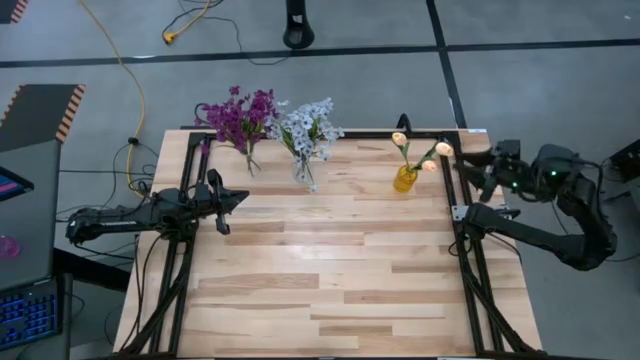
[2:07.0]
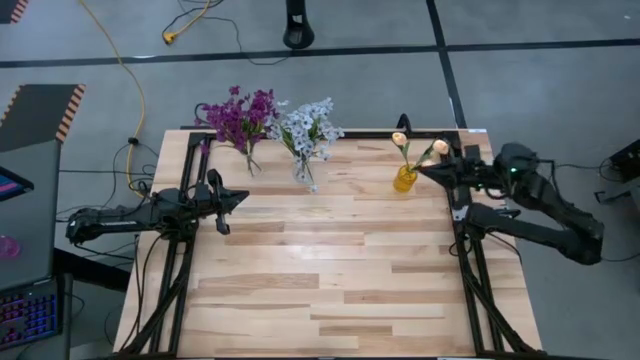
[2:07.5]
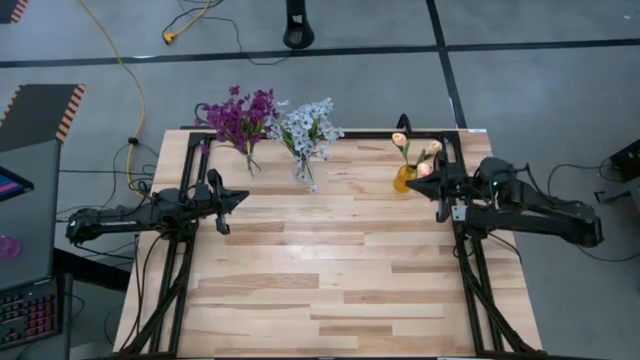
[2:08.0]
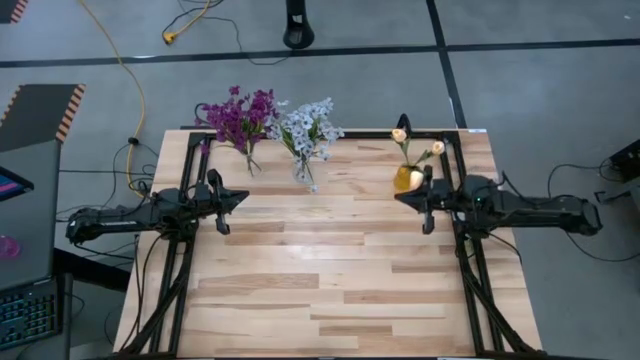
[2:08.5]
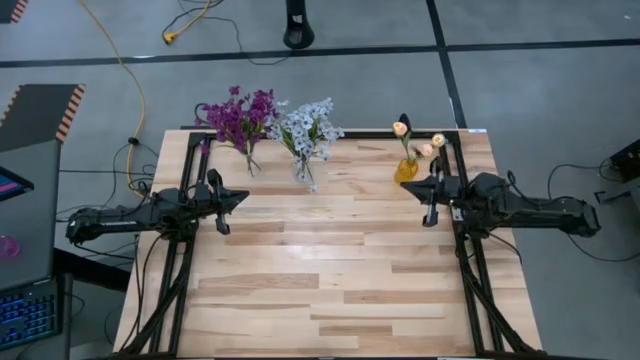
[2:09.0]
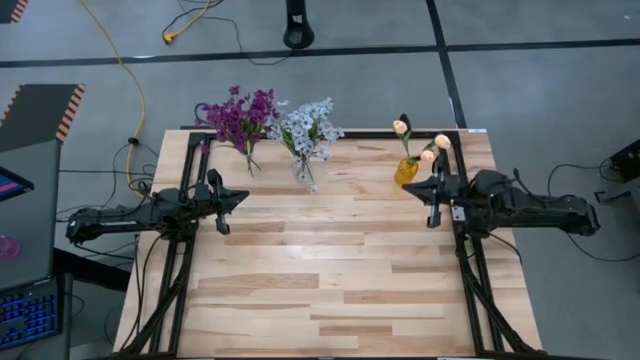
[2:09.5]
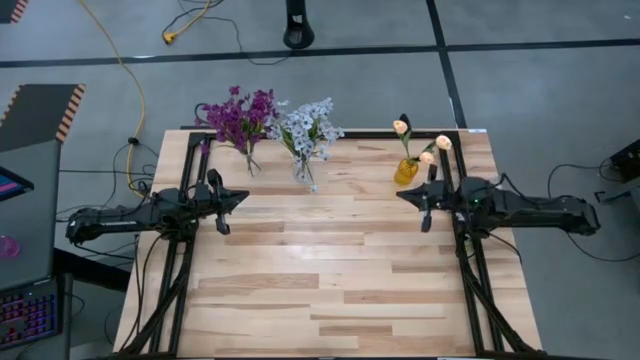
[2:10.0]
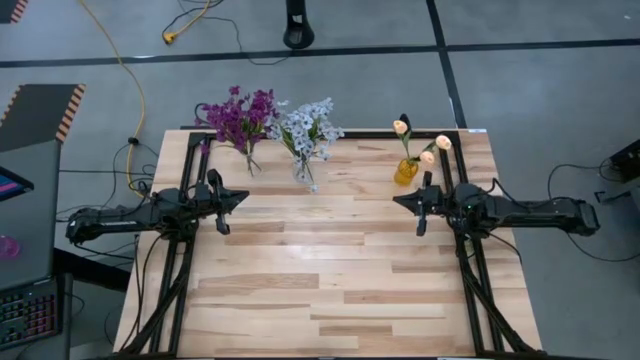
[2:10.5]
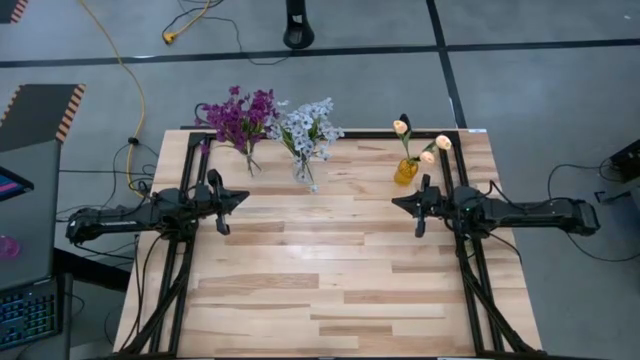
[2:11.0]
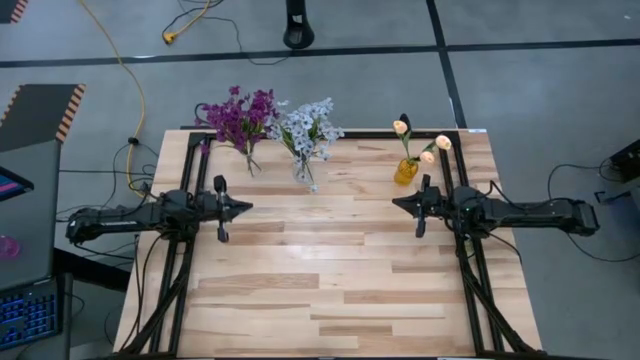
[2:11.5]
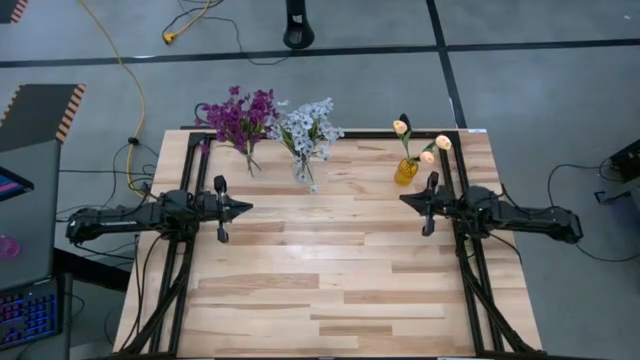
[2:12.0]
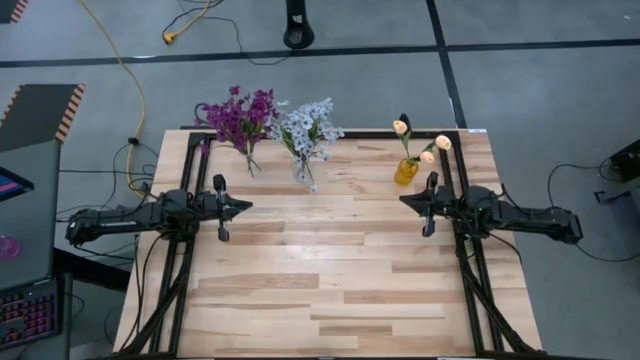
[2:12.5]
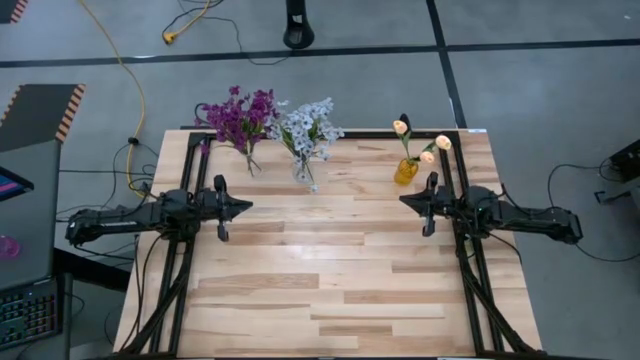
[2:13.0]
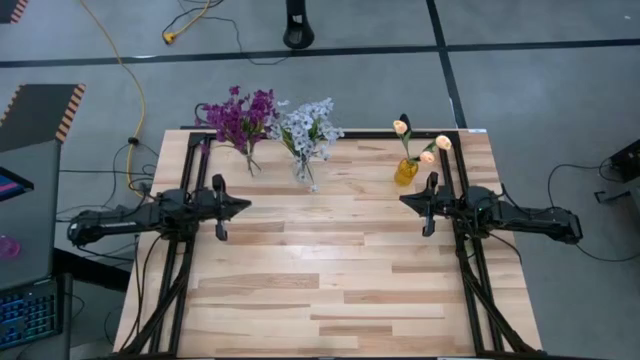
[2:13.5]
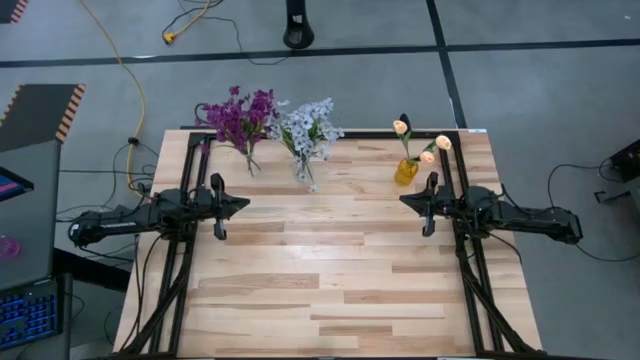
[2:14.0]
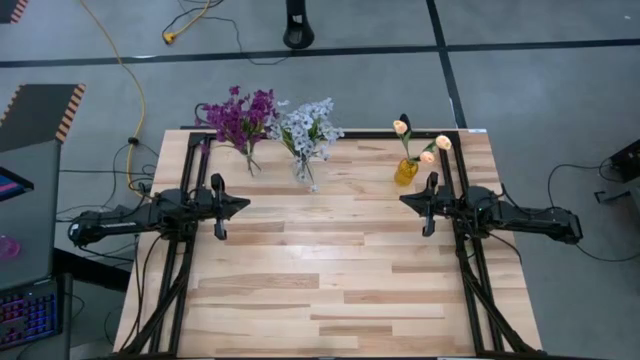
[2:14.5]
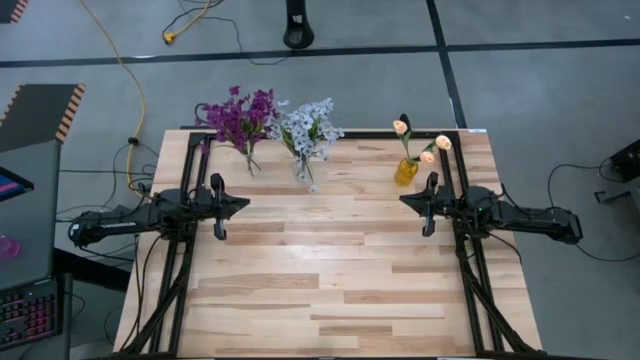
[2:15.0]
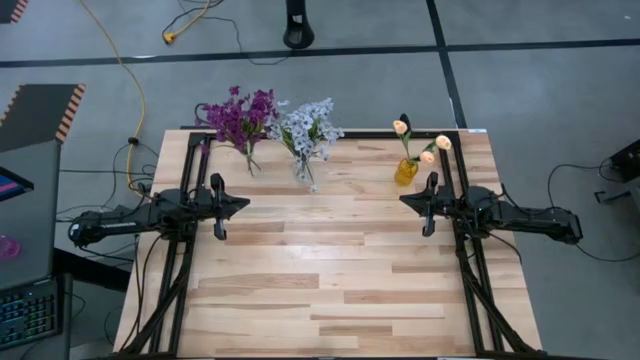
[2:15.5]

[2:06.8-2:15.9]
Task: Sort flowers into vase by color
Return to Home Position

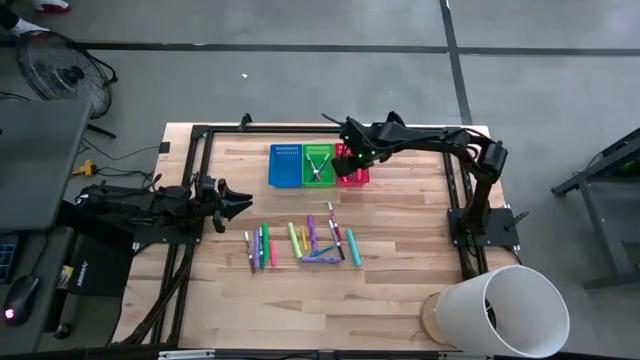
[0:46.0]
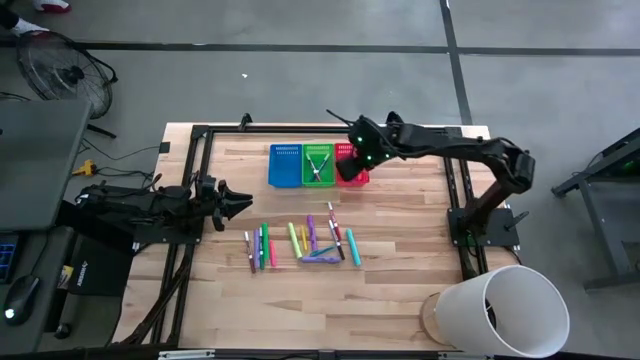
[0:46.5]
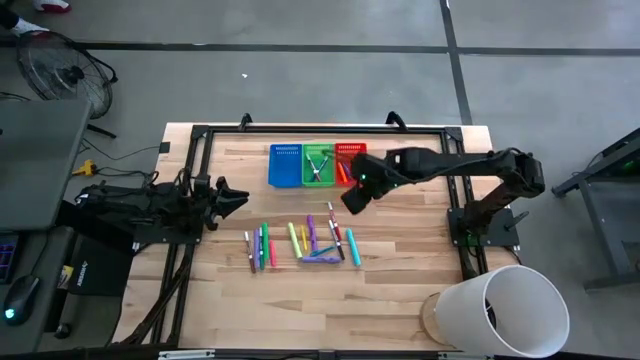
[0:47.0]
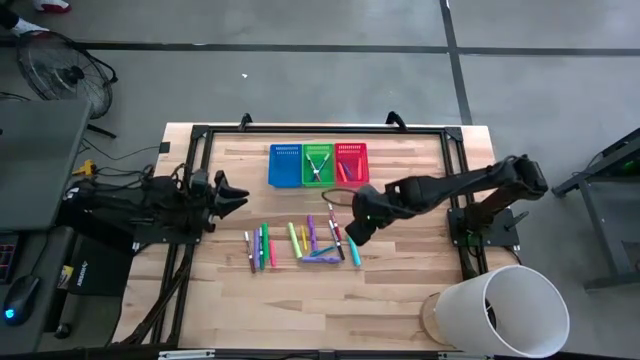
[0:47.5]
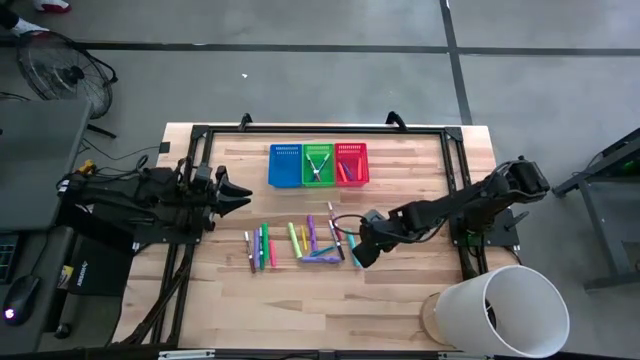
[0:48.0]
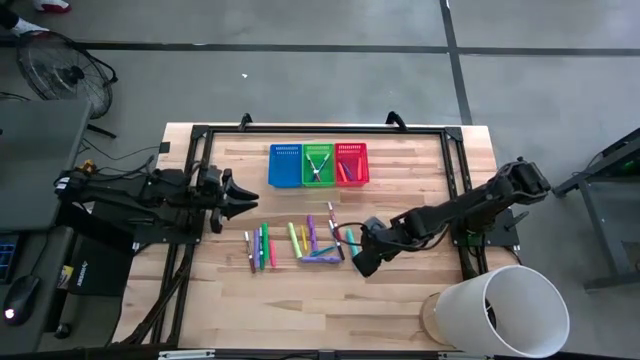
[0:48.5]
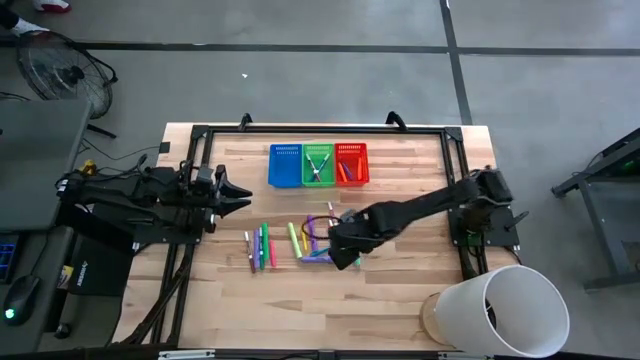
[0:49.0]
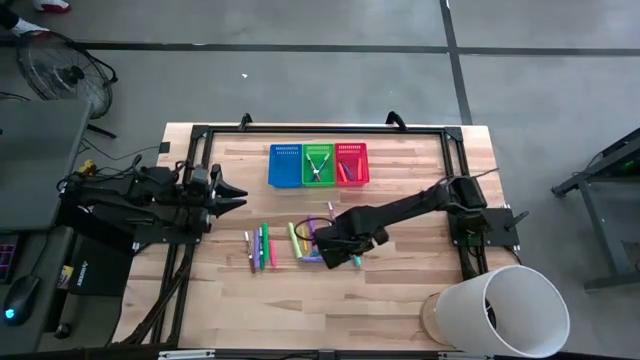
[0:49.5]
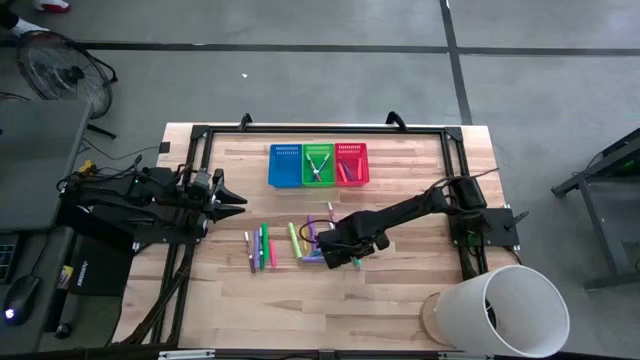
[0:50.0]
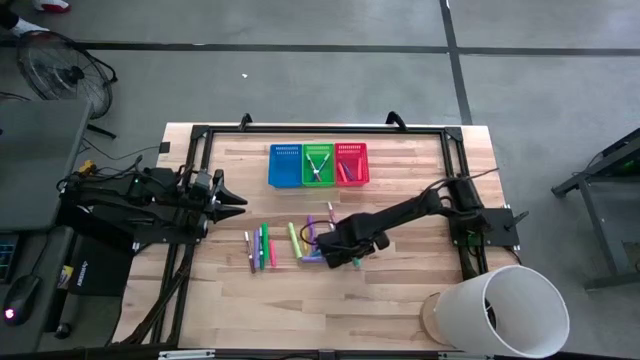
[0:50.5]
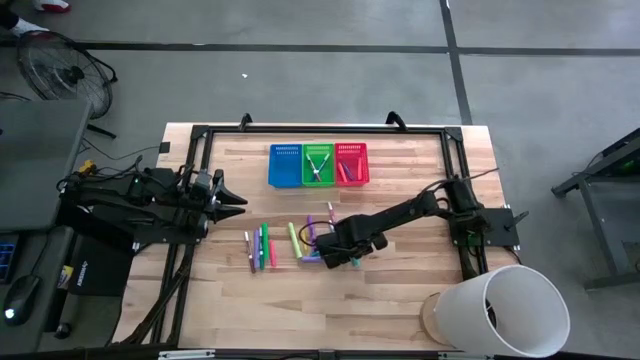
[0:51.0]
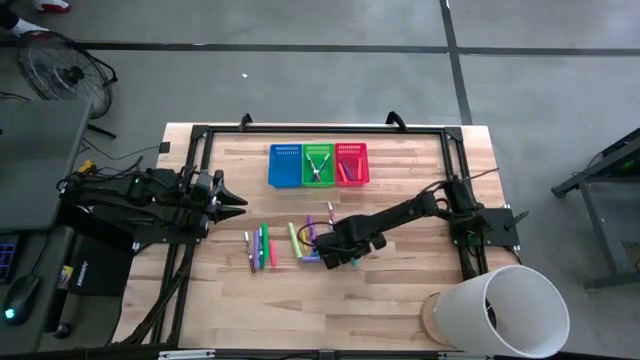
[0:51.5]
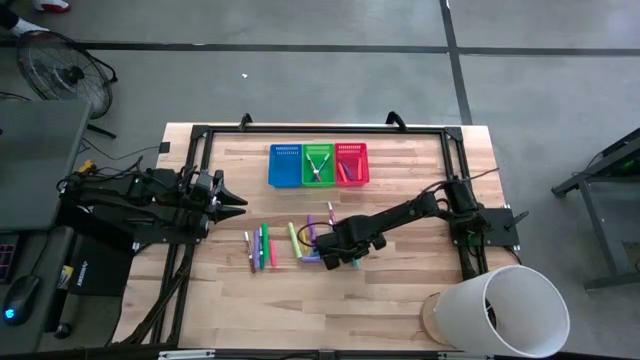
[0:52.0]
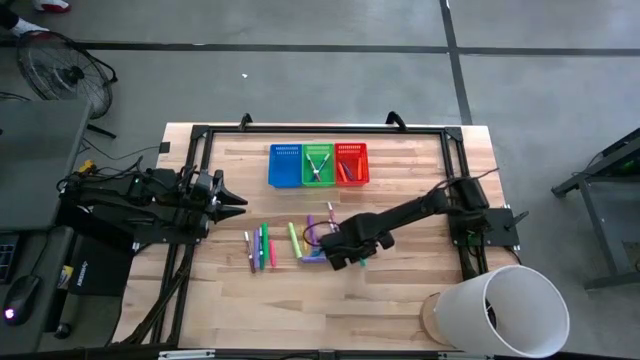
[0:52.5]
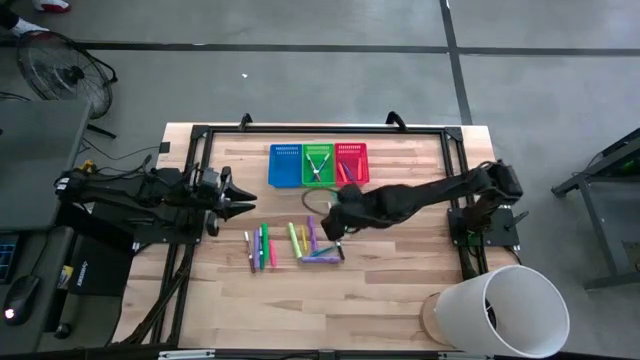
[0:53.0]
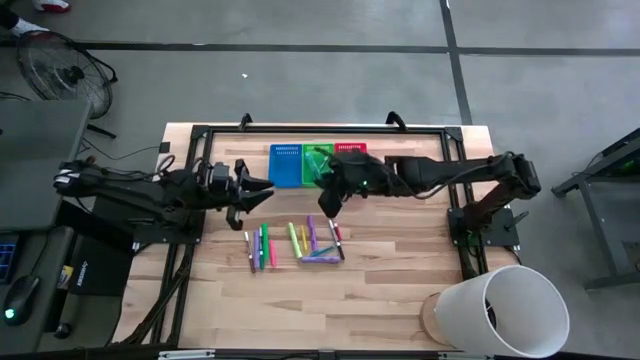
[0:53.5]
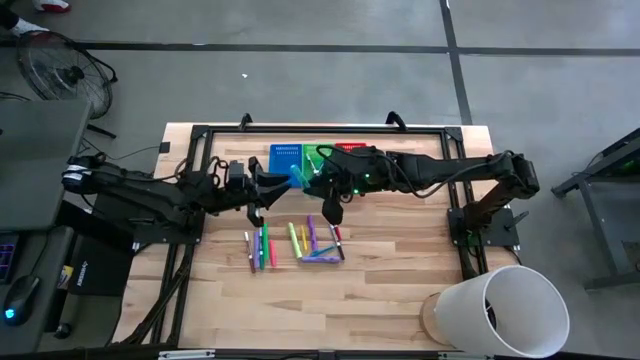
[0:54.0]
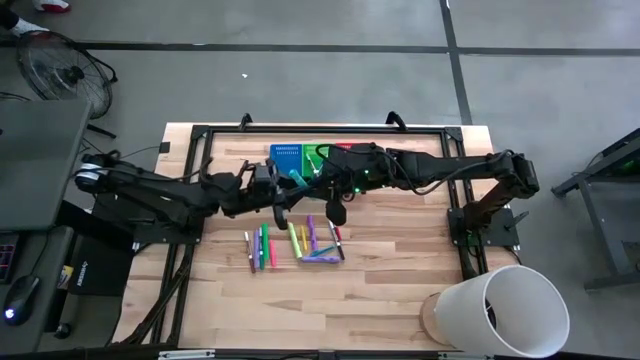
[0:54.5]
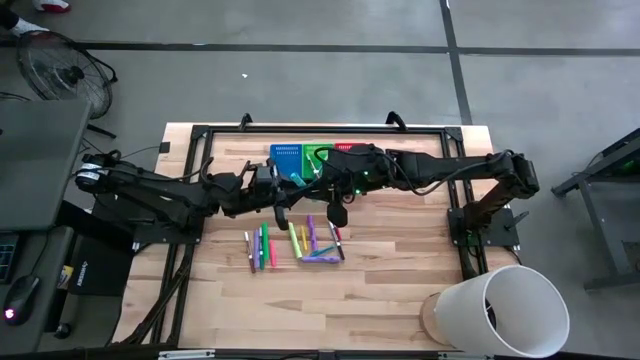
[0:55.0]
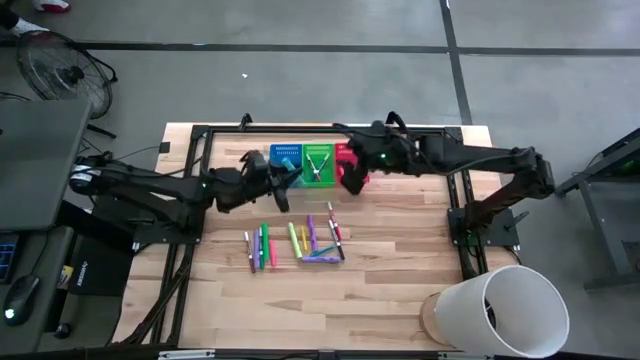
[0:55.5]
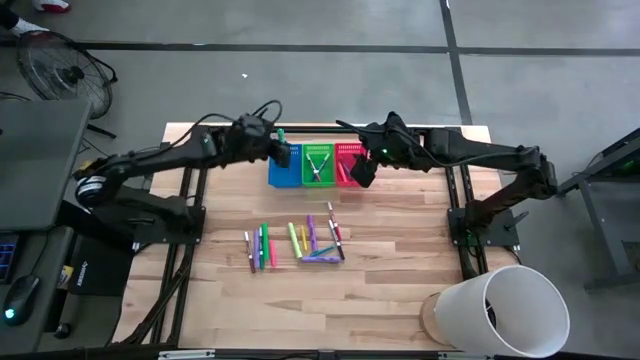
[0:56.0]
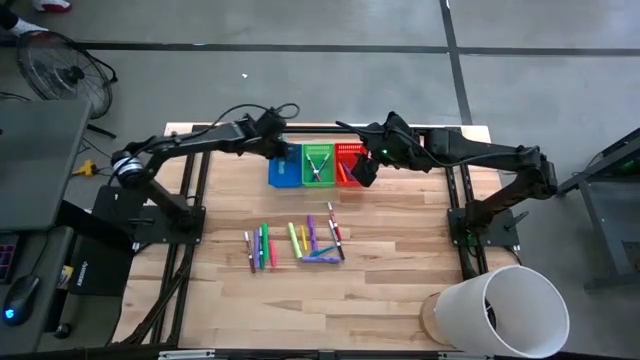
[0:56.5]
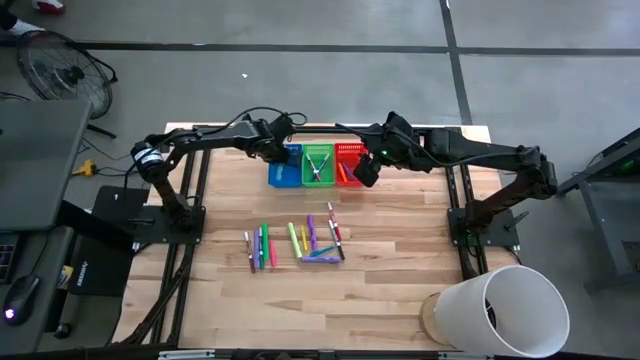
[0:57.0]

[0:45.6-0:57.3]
Task: Pick & Place Markers
Put the mint green highlighter into the blue bin
